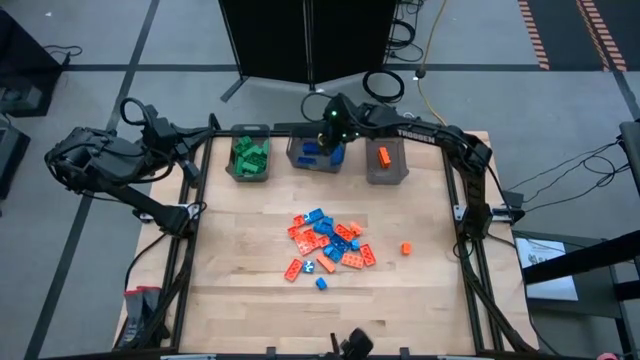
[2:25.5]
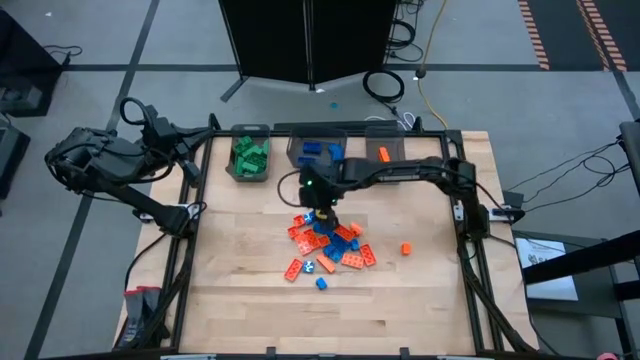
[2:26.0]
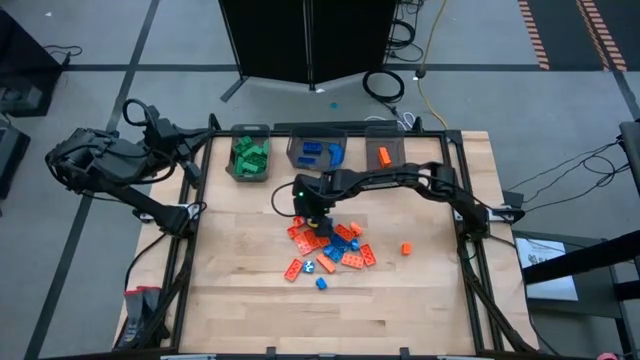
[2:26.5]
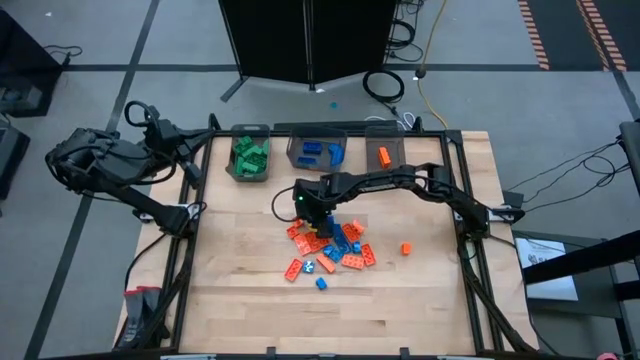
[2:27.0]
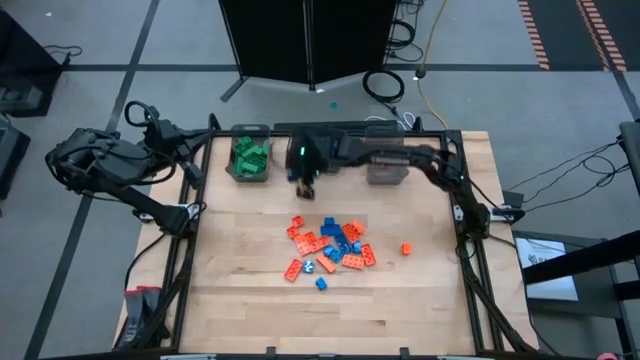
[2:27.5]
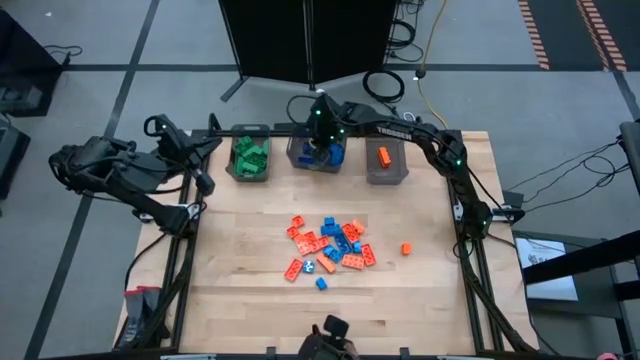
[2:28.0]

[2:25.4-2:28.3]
Task: Sort blocks
Put the blue game piece into the middle black bin

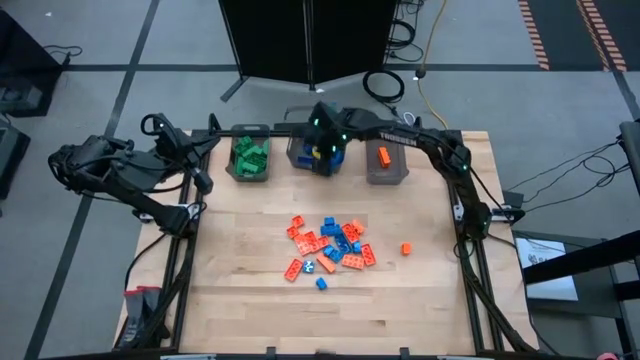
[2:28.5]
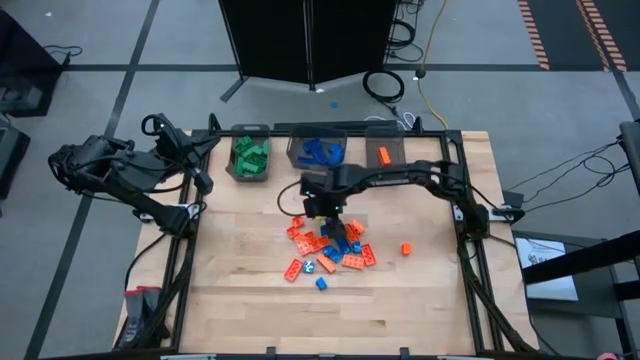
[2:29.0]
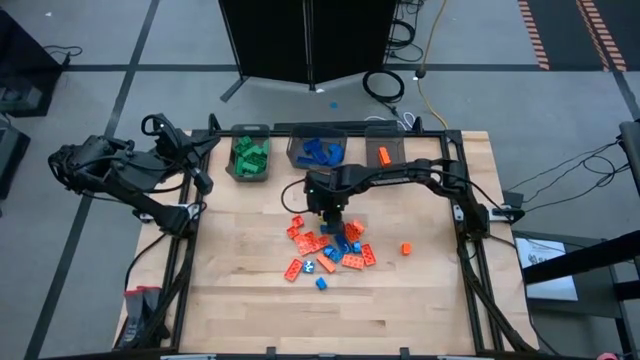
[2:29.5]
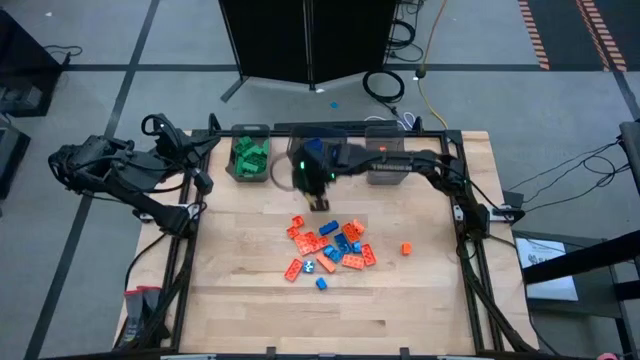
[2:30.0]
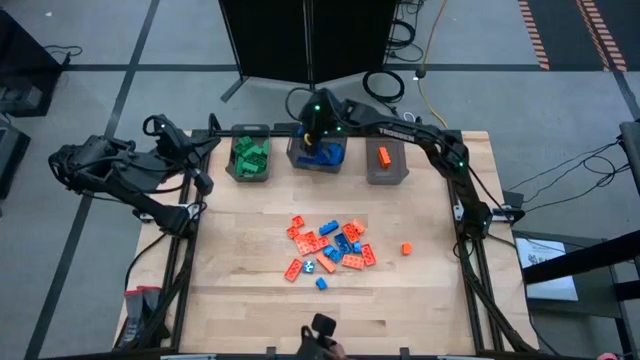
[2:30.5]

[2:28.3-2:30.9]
Put the blue game piece into the middle black bin

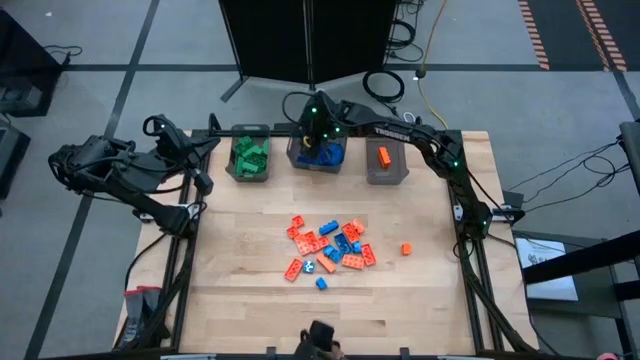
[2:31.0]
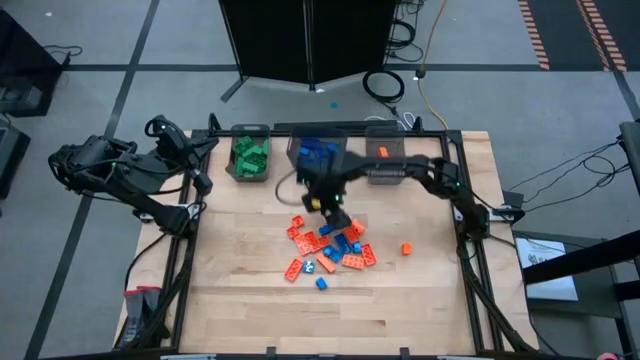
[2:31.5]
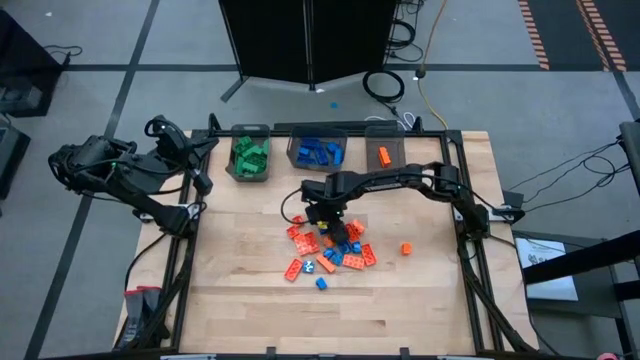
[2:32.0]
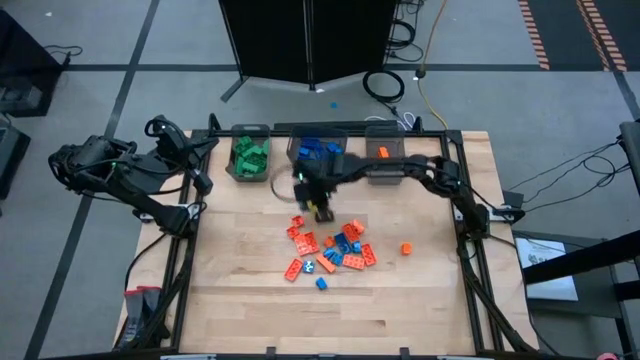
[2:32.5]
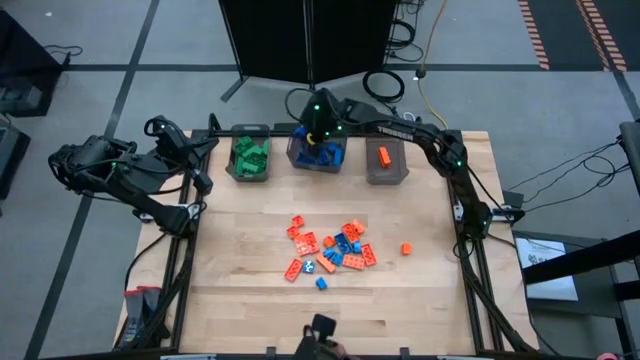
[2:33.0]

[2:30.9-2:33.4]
Put the blue game piece into the middle black bin

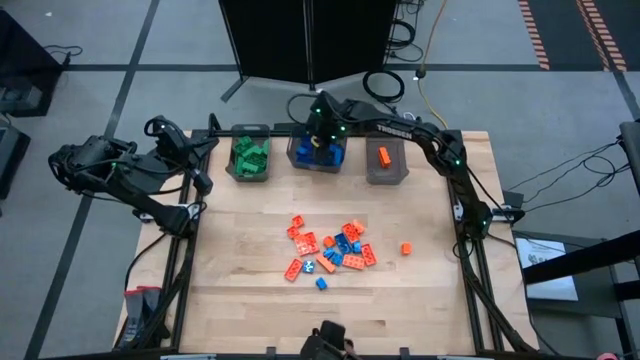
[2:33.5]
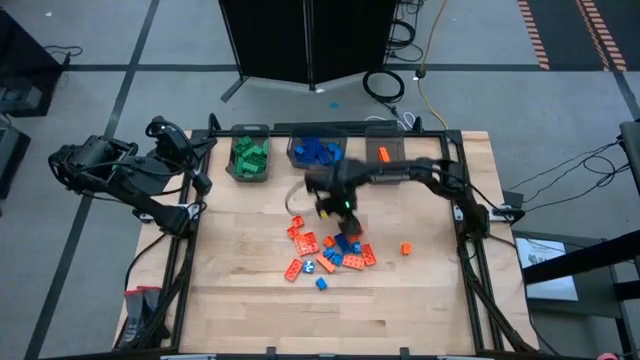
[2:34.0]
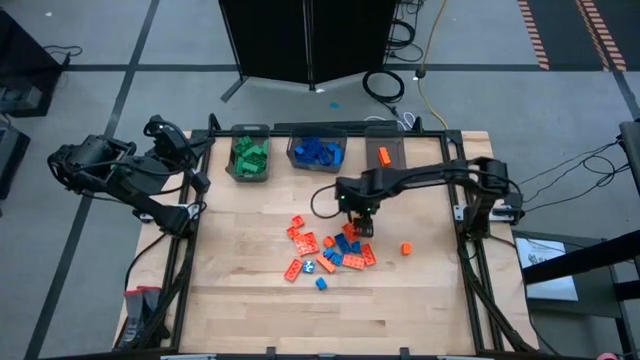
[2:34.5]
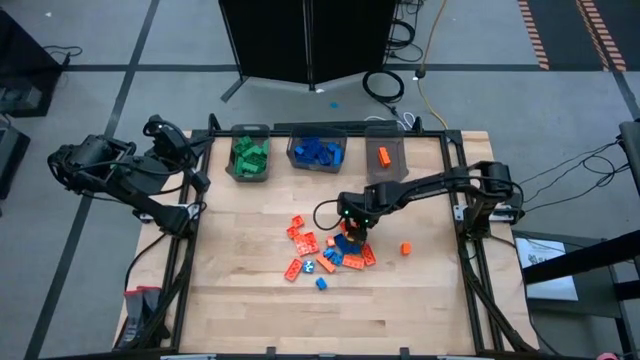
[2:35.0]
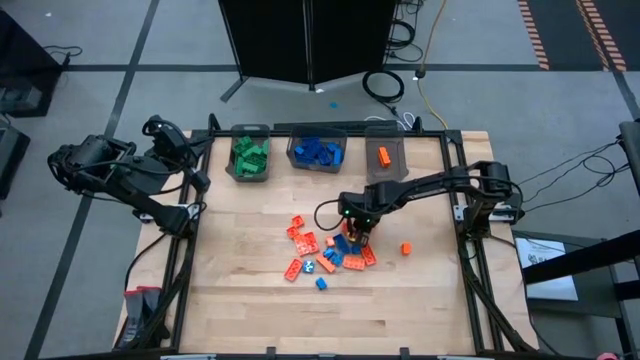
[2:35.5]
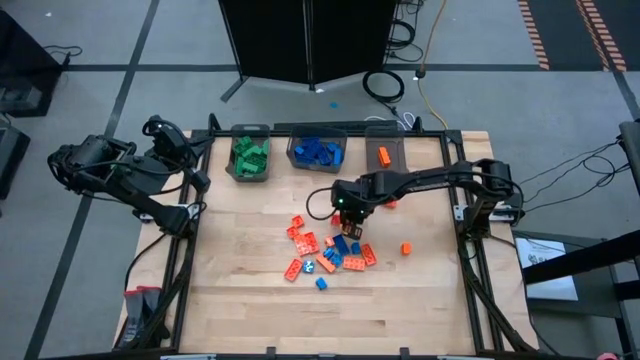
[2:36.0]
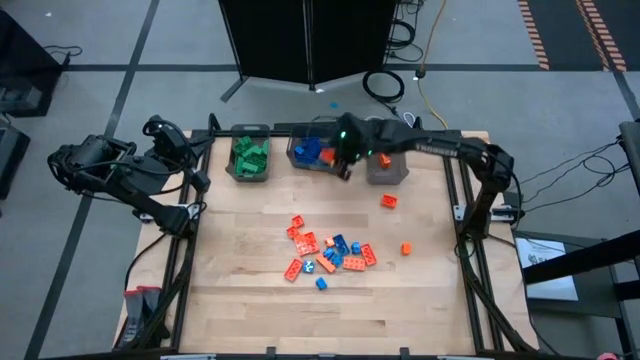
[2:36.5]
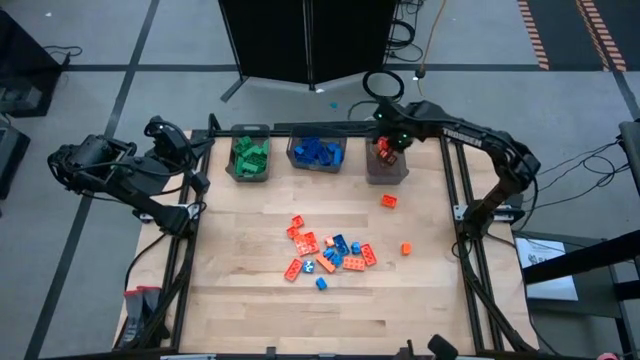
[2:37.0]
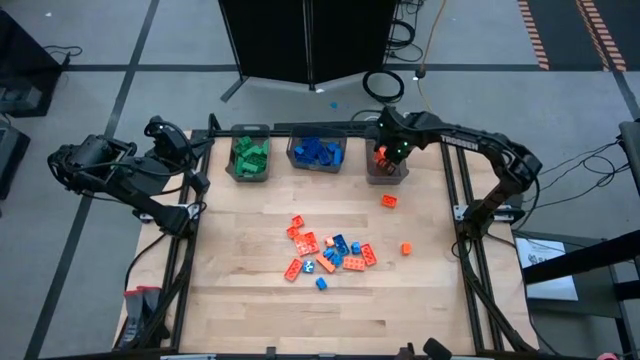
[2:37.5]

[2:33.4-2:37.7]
Put the orange game piece into the right black bin

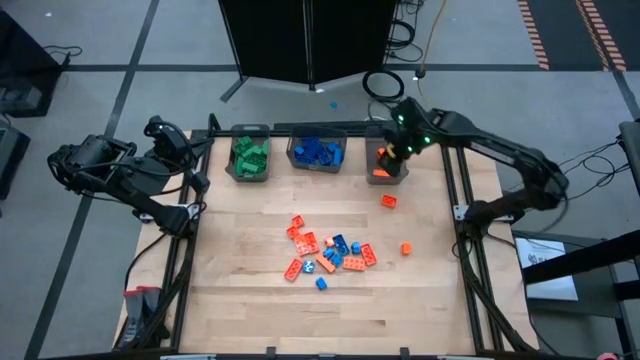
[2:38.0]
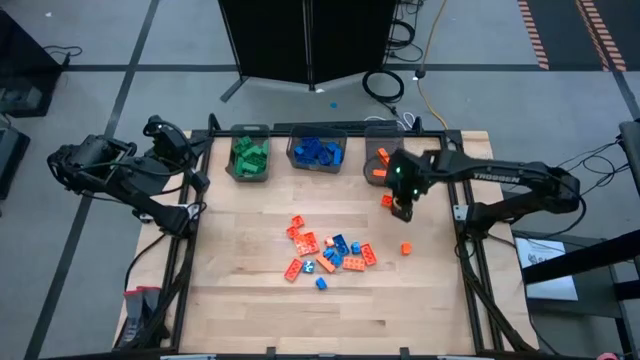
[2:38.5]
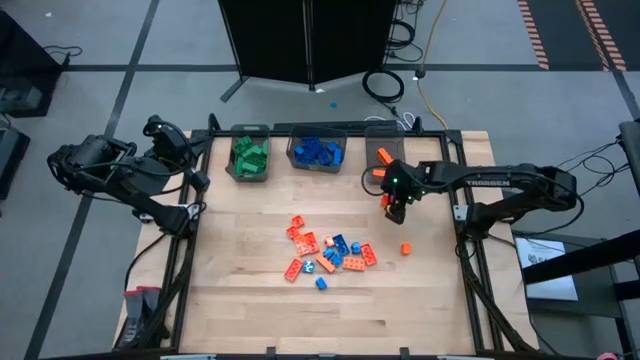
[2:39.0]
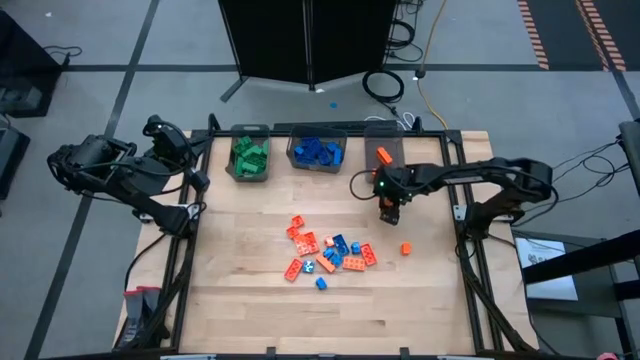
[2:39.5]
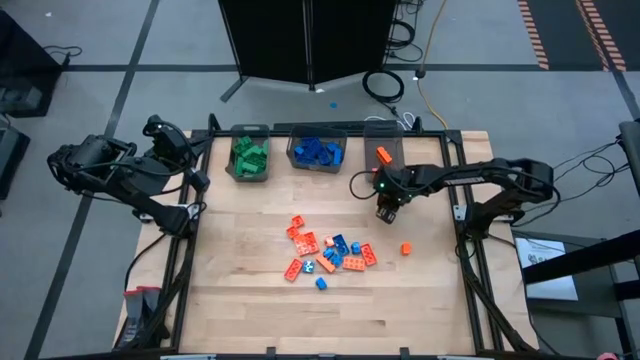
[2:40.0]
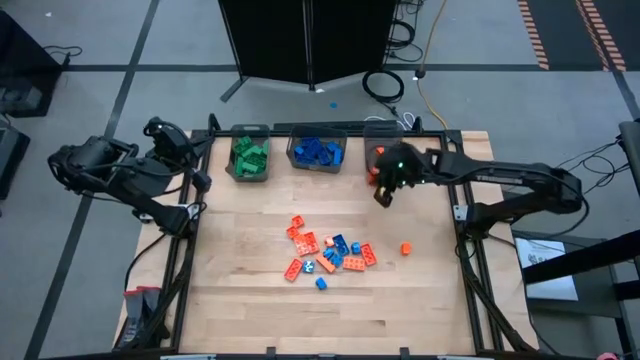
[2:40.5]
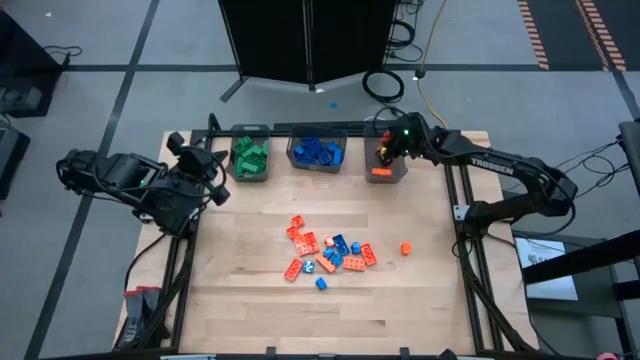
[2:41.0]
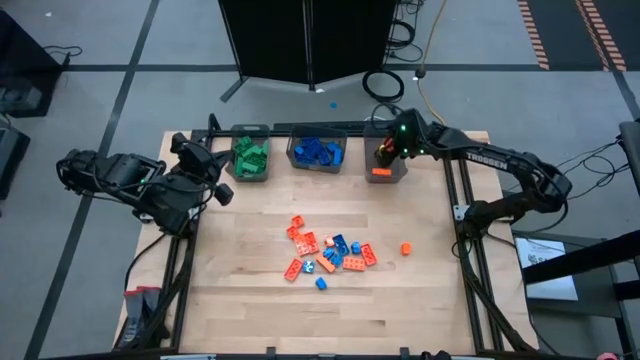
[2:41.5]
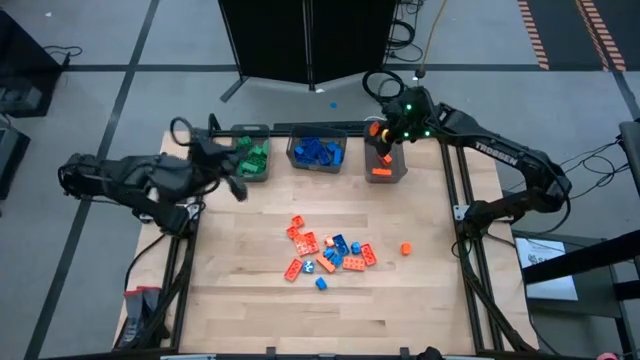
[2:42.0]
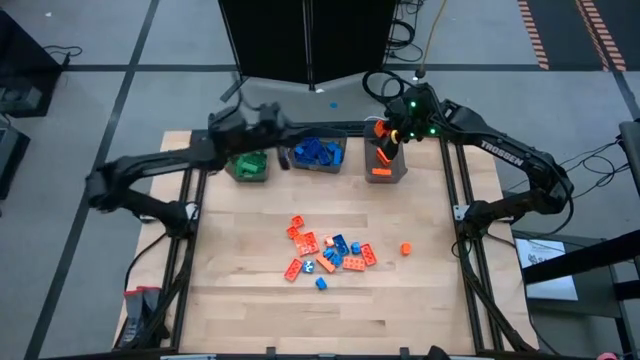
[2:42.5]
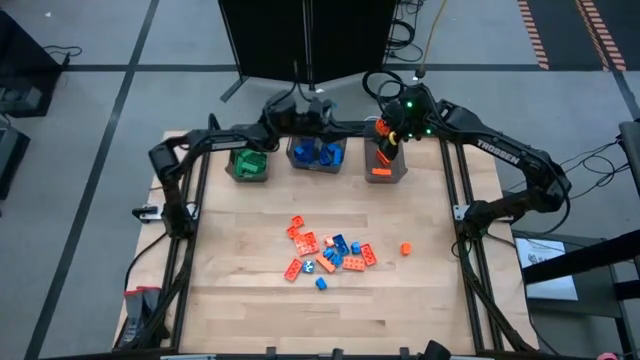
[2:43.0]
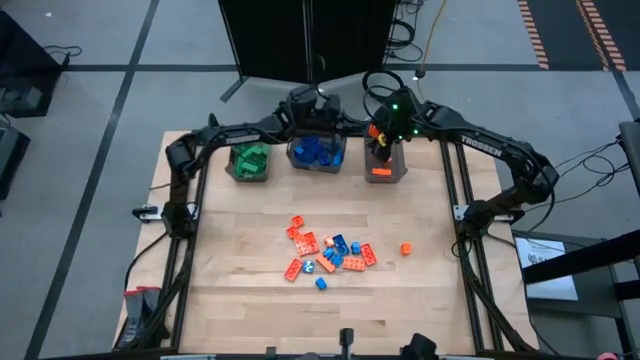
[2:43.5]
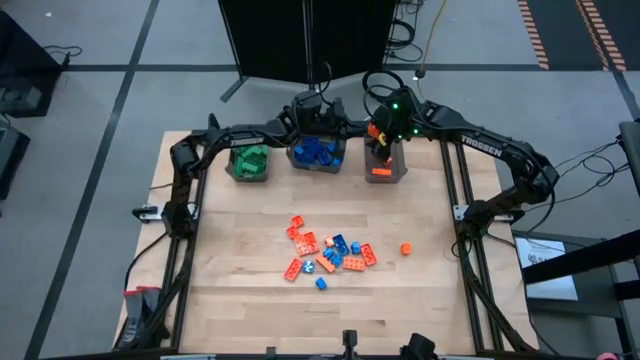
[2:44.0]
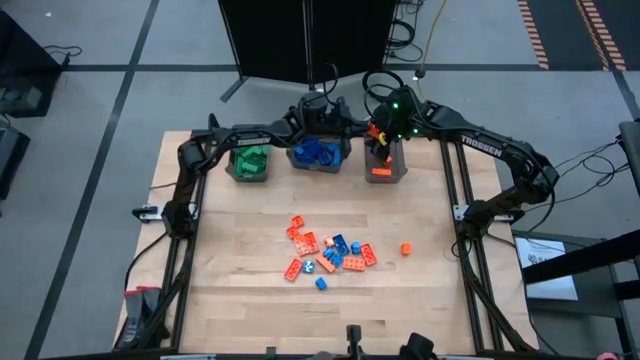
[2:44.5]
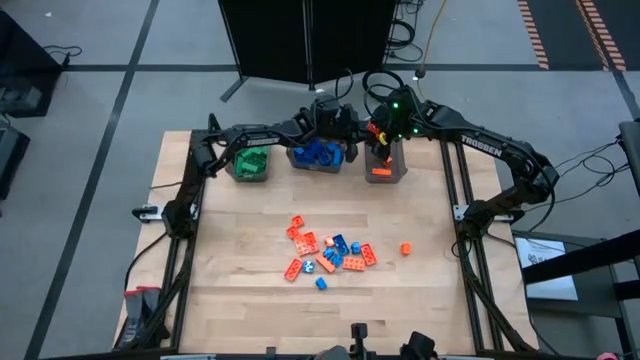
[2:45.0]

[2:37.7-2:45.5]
Put the orange game piece into the right black bin

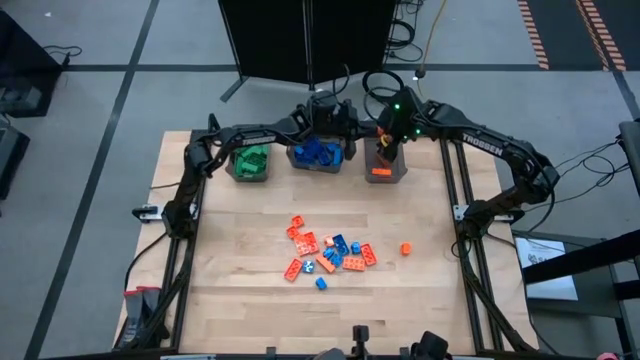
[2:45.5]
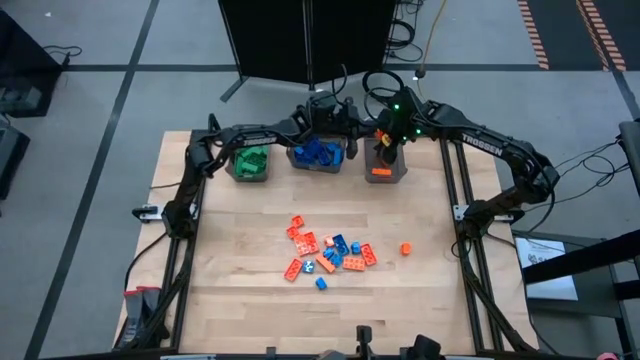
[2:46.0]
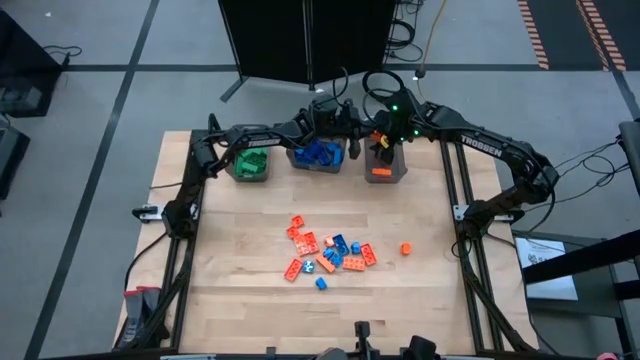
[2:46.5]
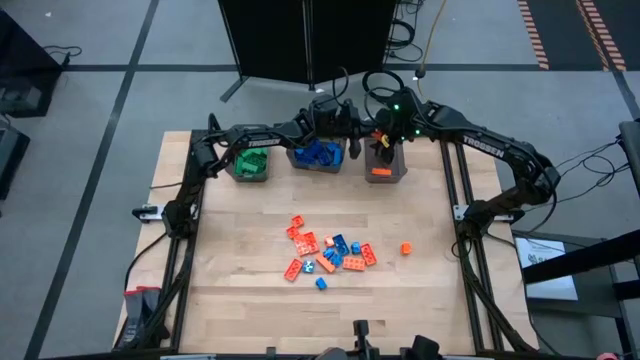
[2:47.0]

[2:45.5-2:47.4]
Put the orange game piece into the right black bin
